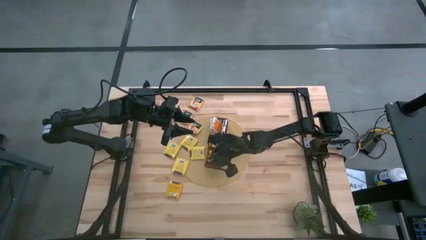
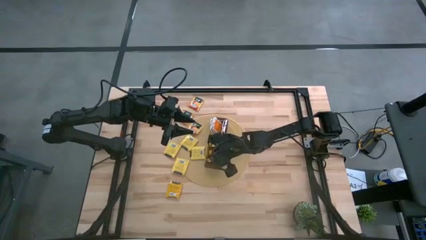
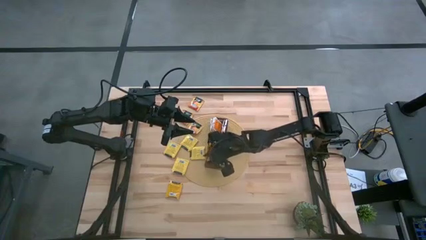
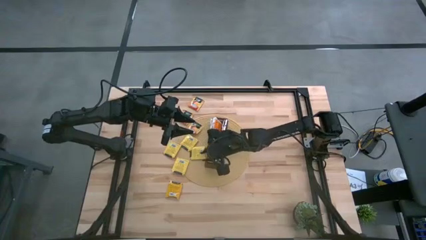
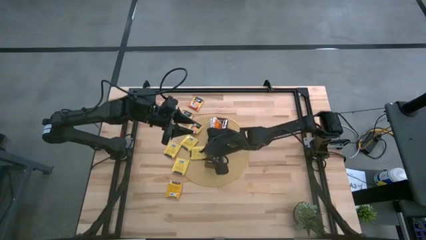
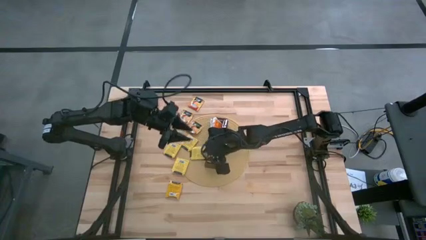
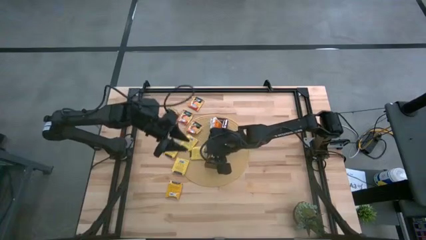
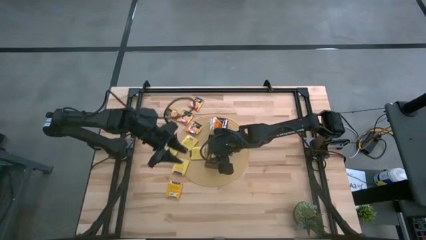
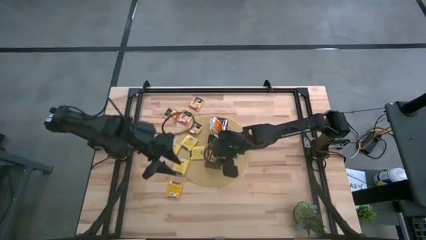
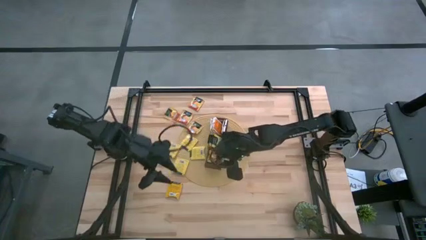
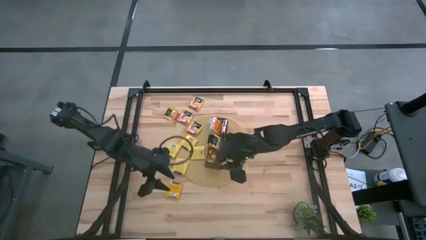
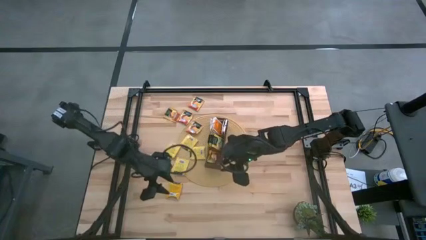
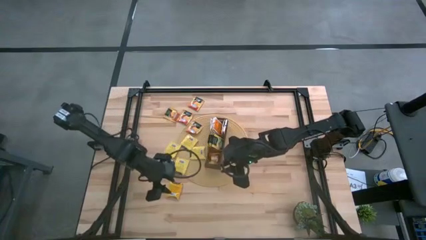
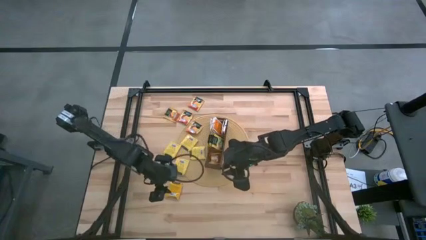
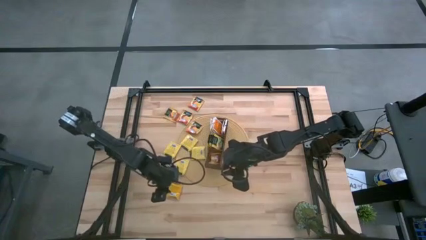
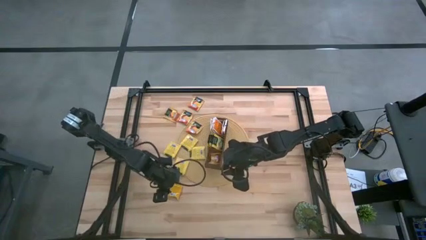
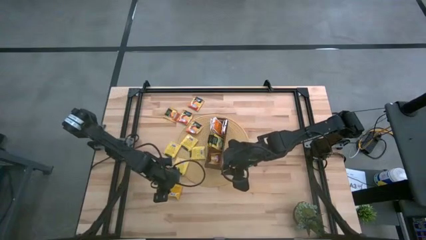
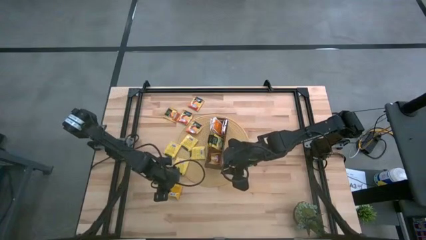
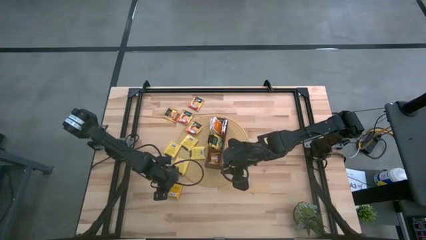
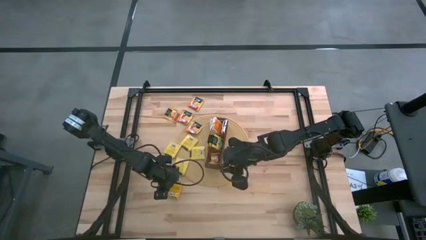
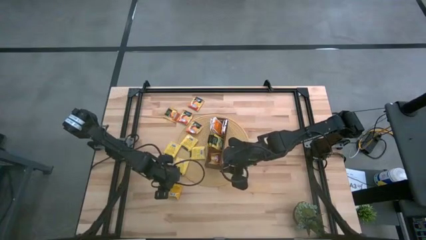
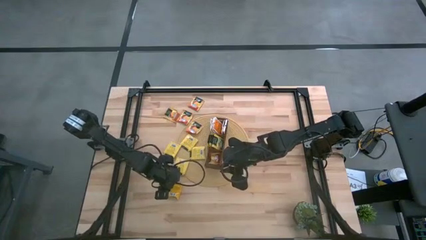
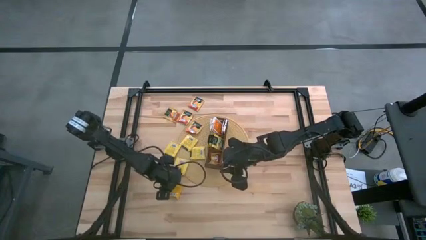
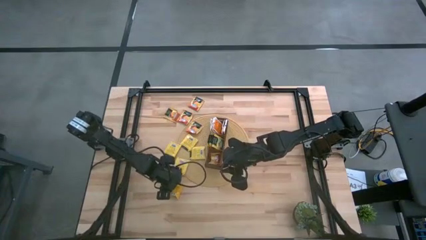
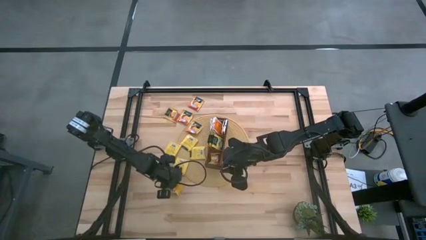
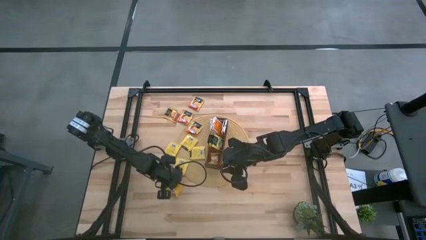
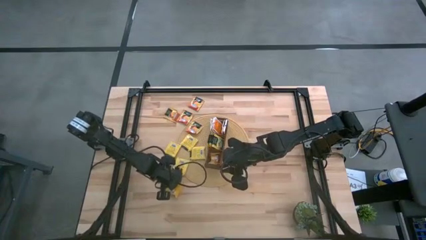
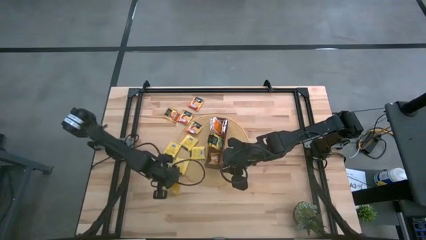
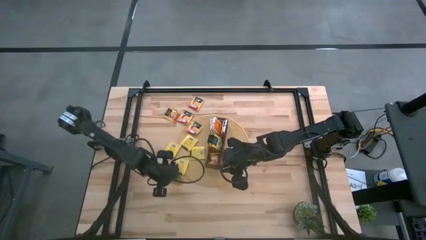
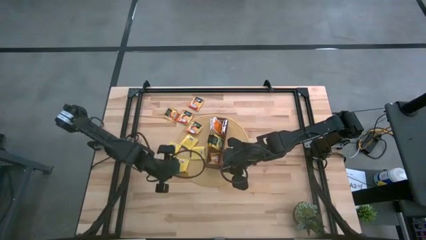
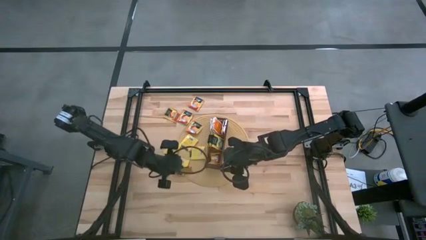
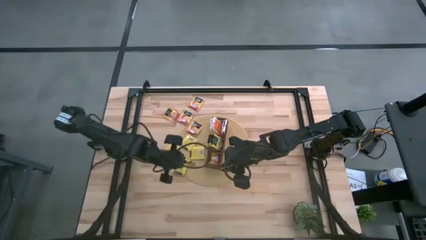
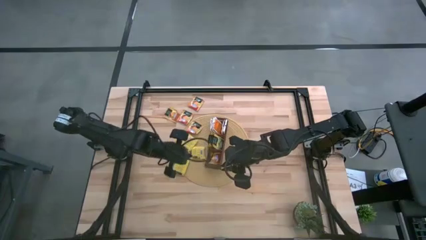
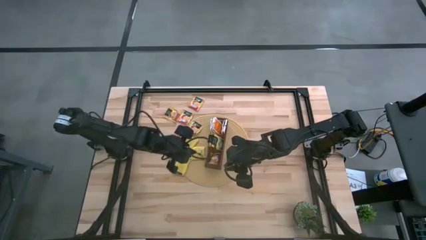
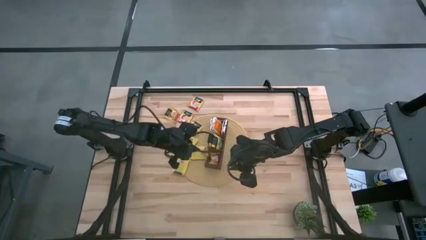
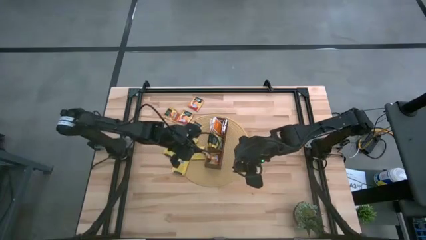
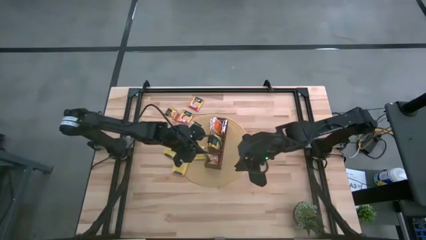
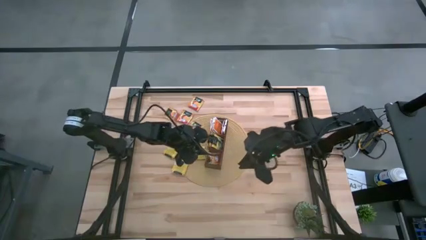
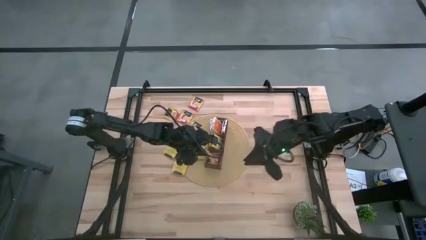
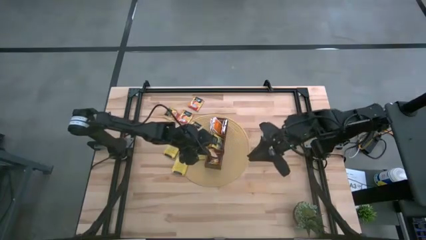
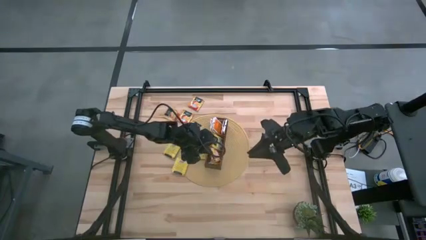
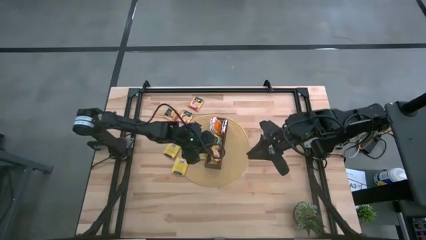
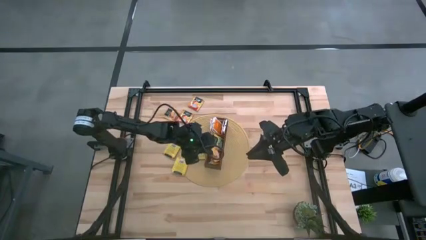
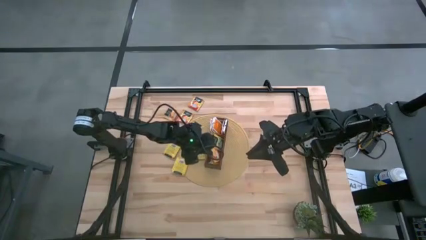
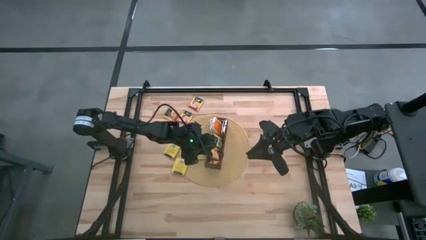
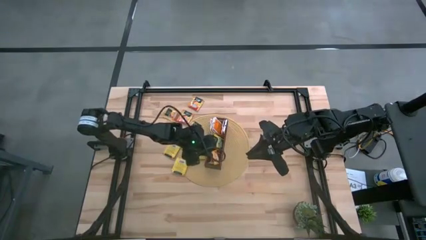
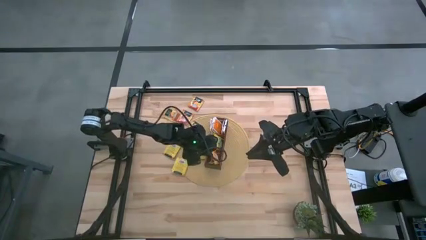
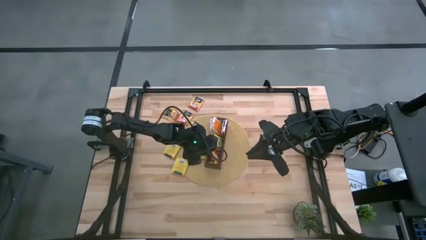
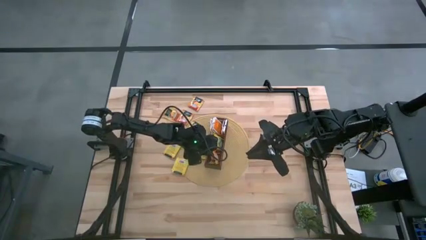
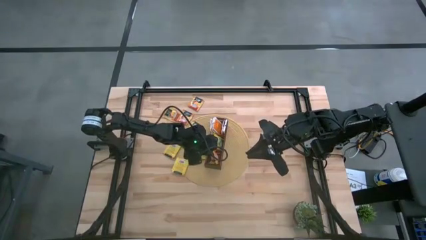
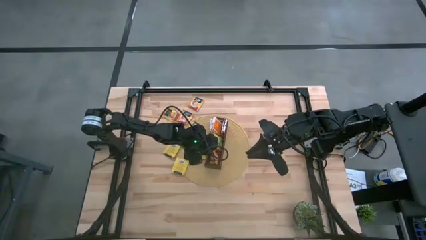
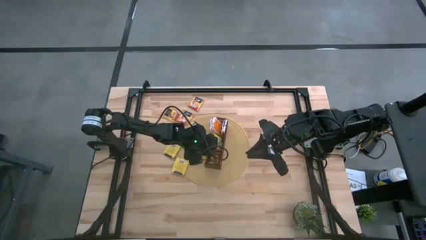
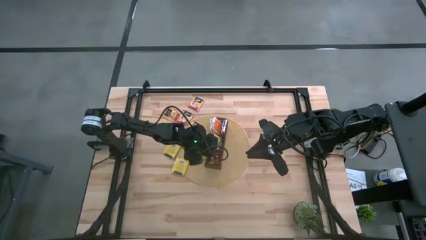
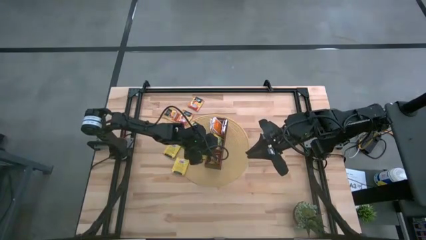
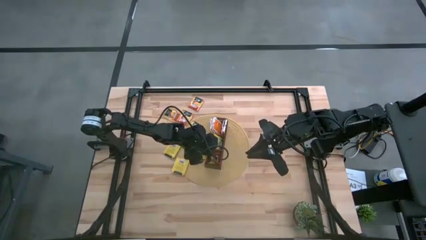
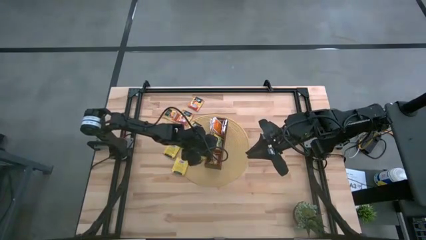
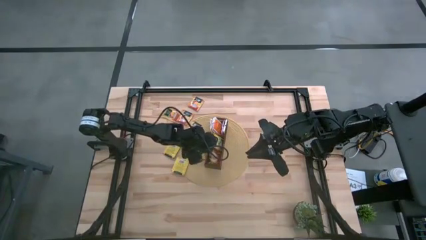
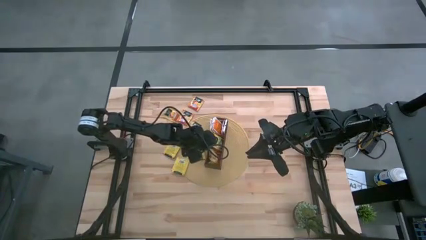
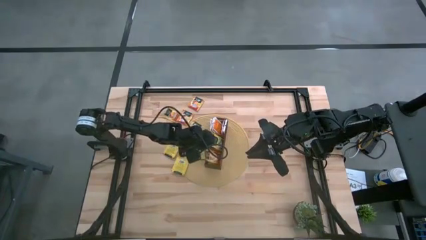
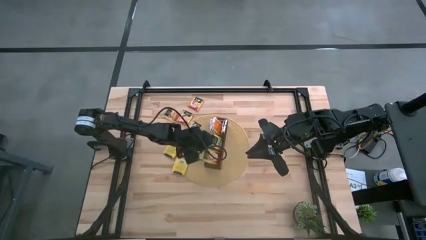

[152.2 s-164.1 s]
Task: Pick & Place Tea
Put the orange tea bag into the bottom section of the wooden organizer

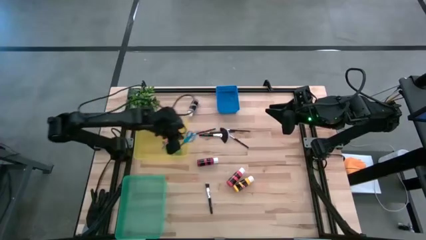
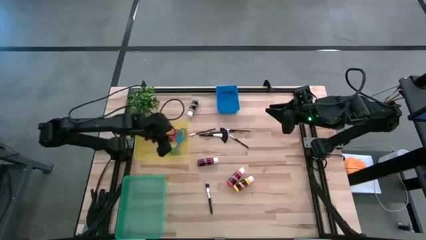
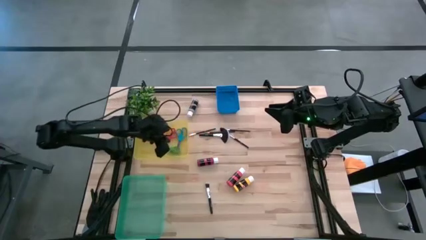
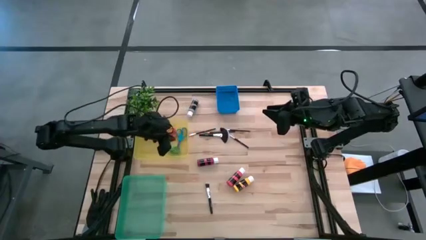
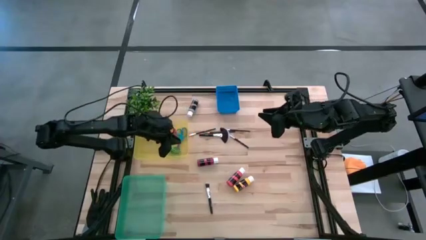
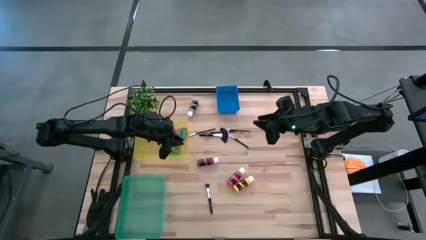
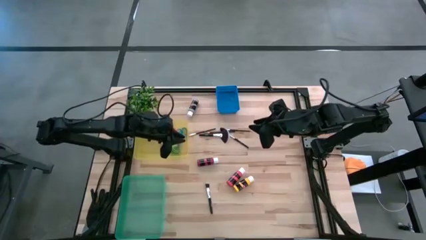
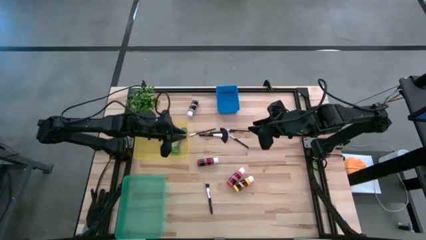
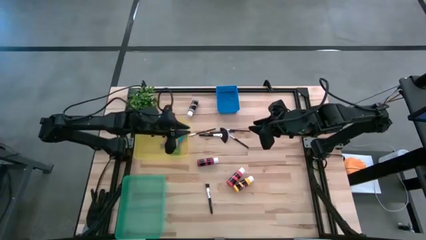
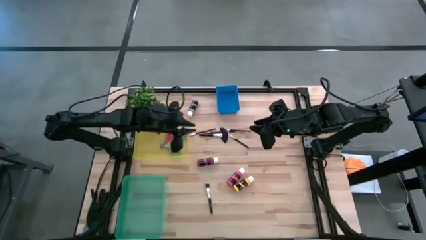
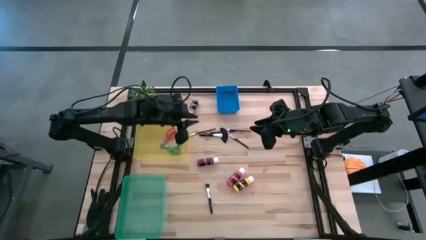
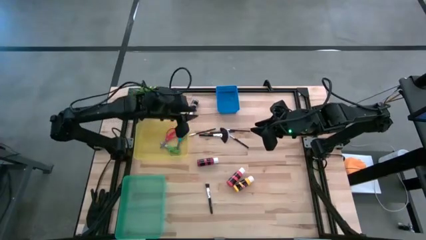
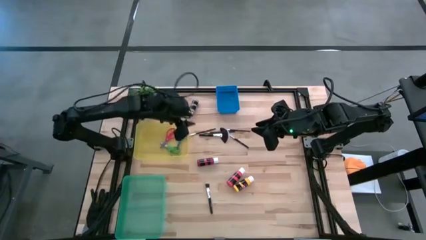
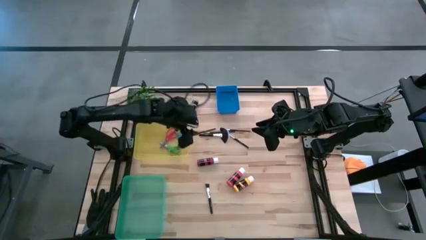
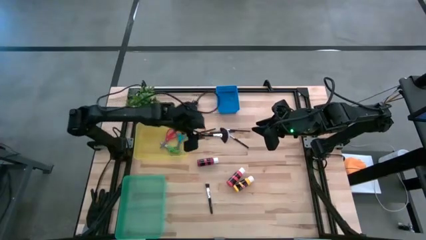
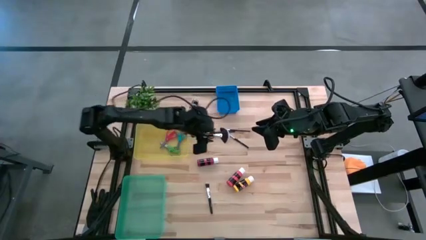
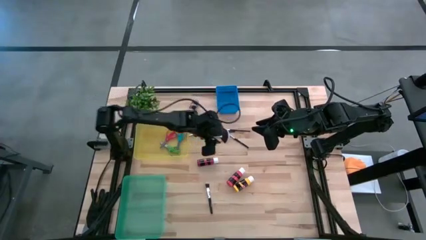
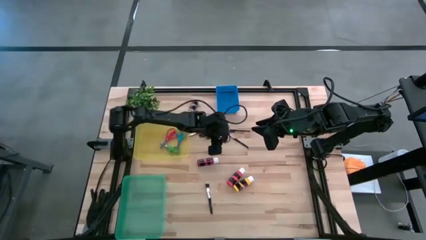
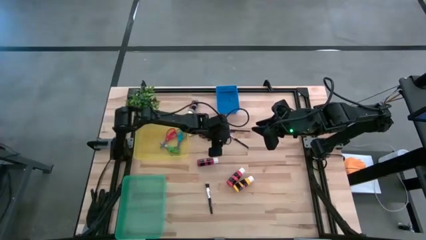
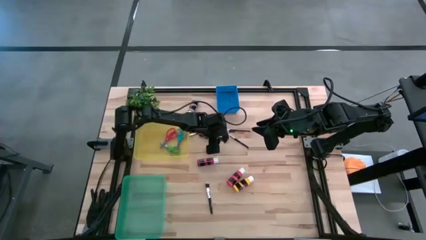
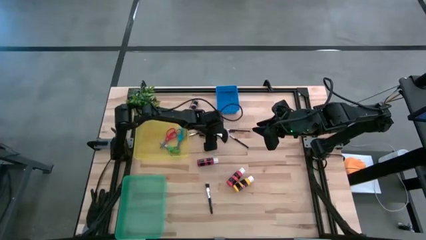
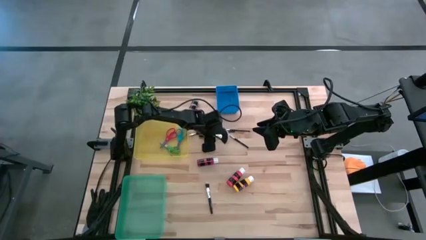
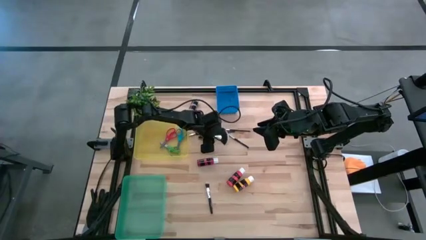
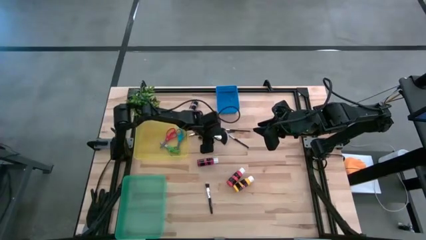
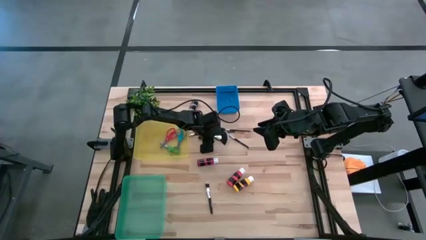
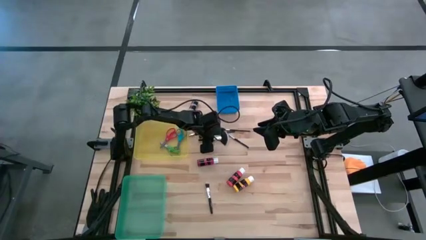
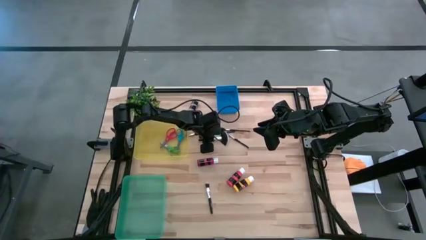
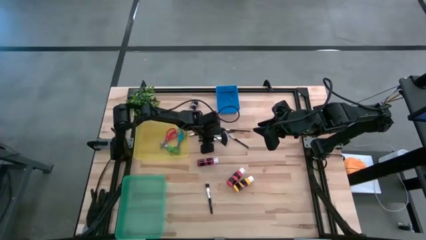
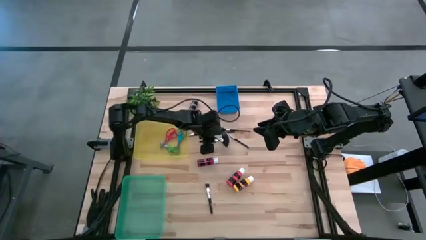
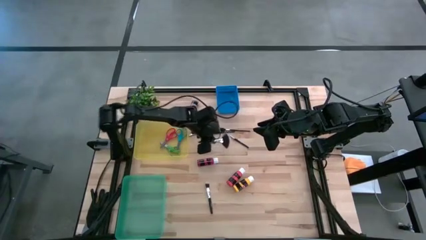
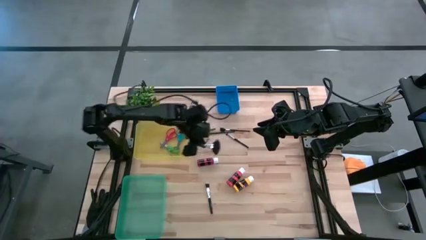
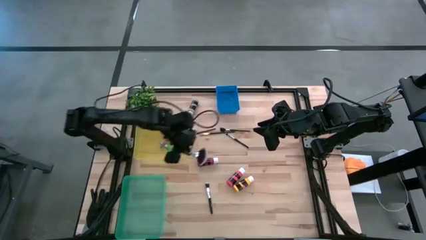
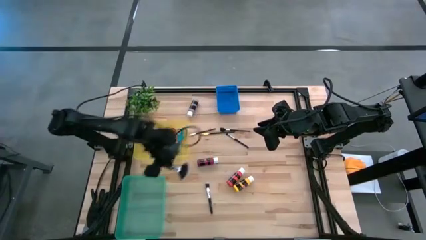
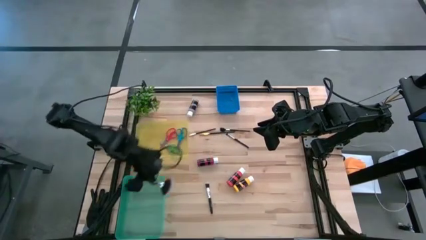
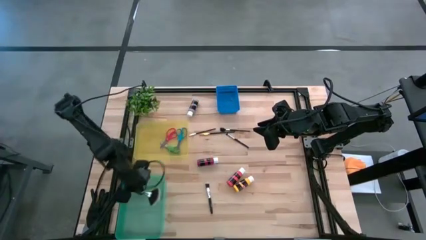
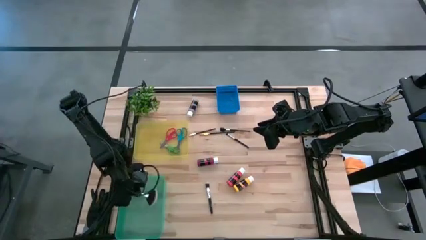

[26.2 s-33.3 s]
Task: Pick & Place Paint Supplies
Put the highlighter brush into the blue bin
